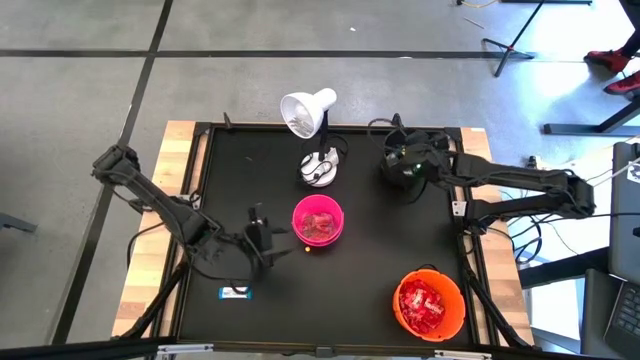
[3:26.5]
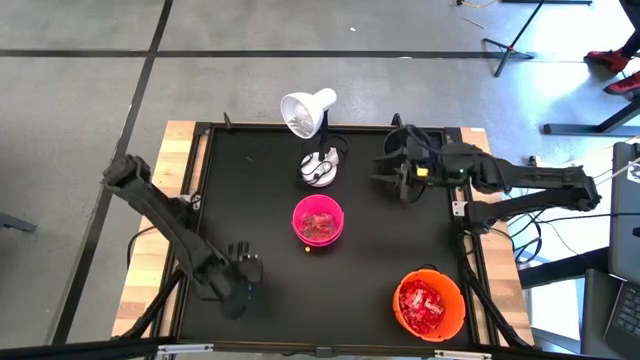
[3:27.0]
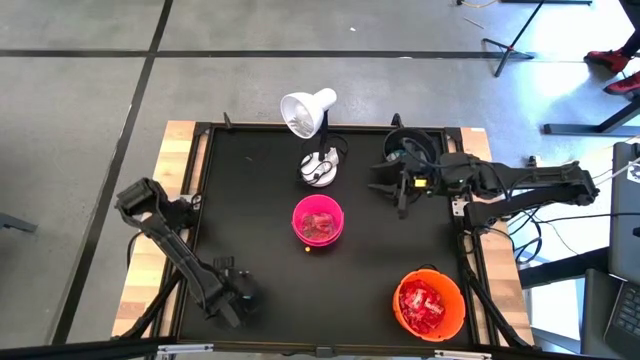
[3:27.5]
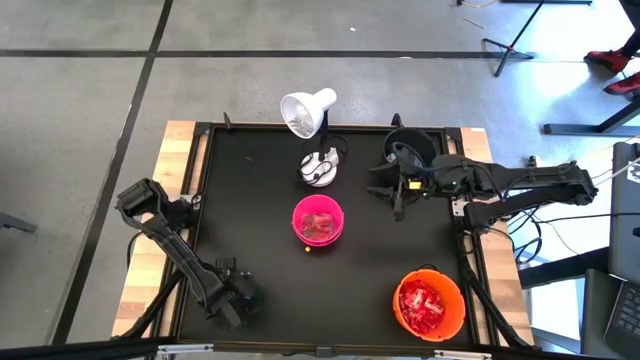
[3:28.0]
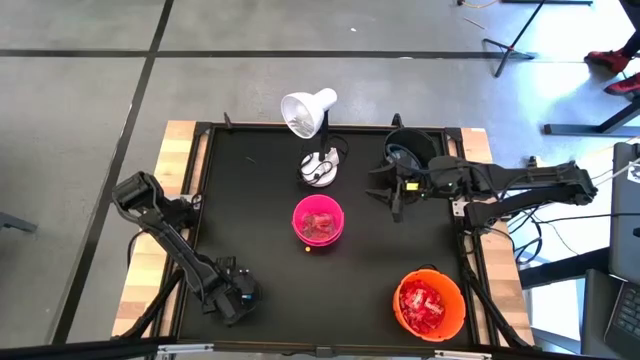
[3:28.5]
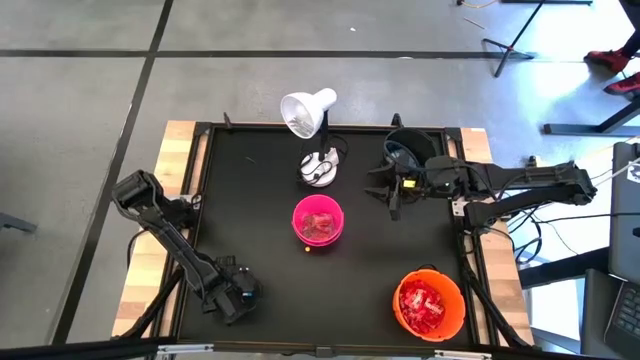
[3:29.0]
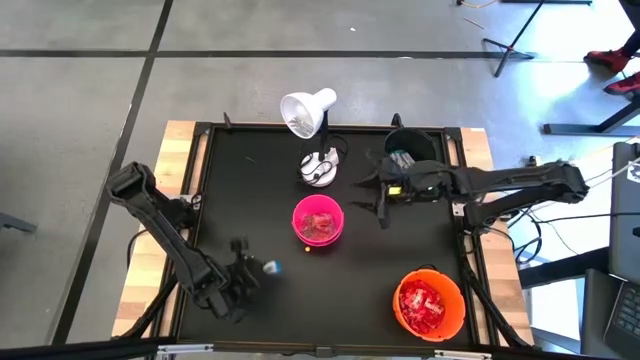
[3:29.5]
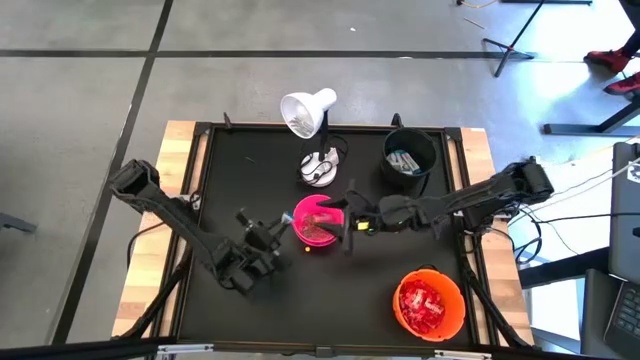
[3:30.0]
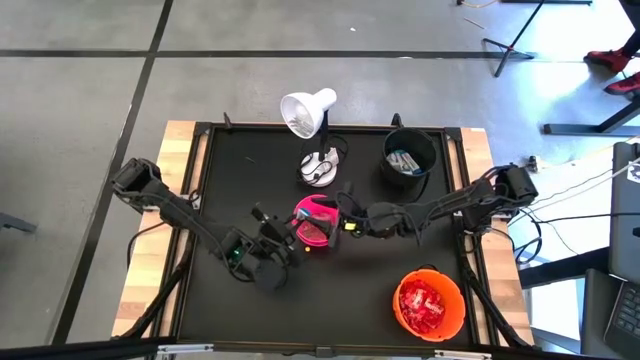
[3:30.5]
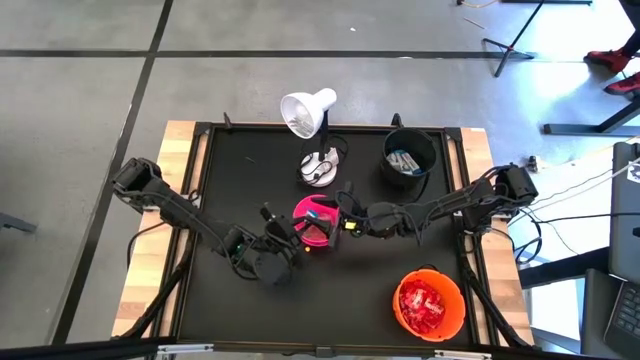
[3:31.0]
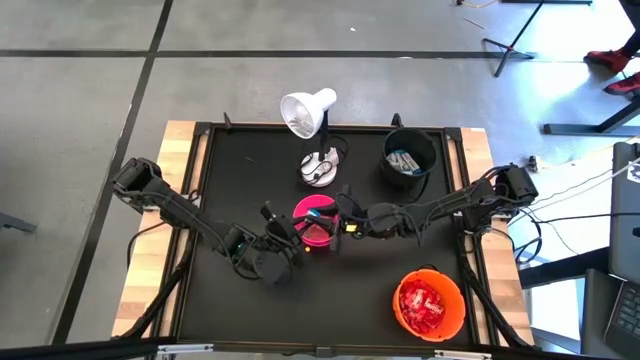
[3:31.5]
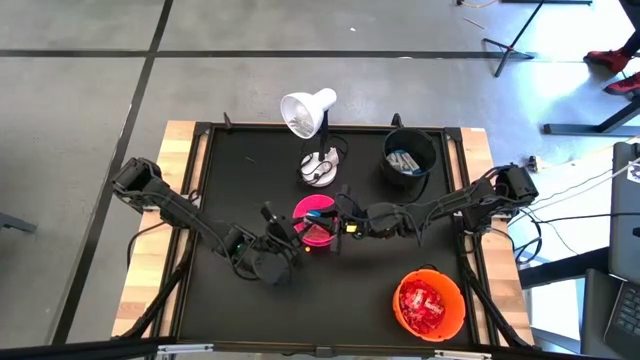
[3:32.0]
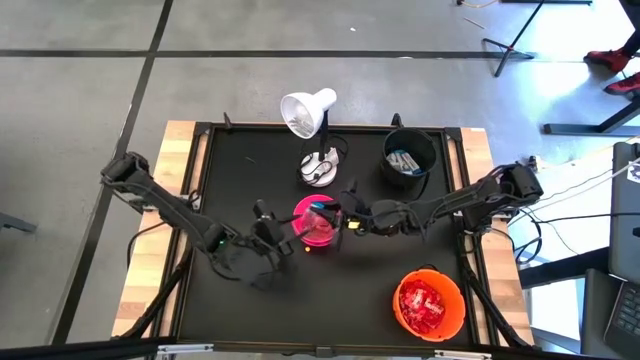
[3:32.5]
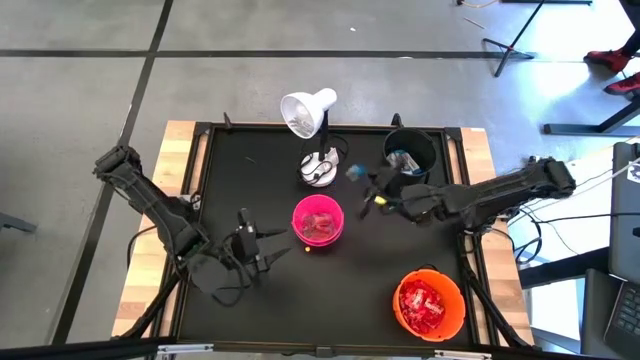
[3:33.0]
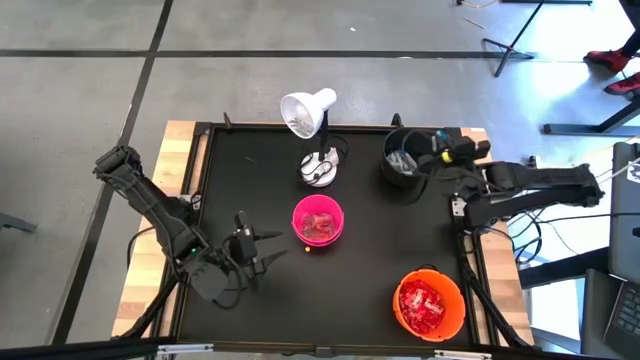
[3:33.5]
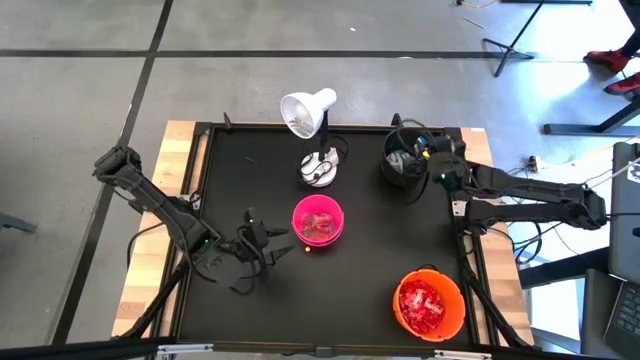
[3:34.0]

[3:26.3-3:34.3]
Task: Sort candy
Put the white chocolate bar into the black bucket

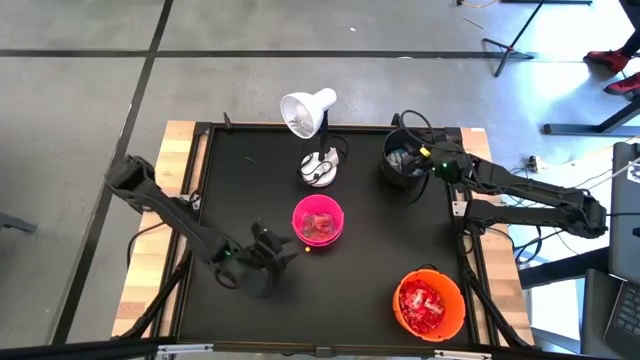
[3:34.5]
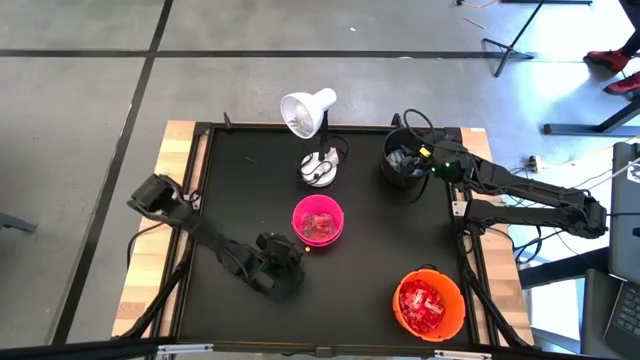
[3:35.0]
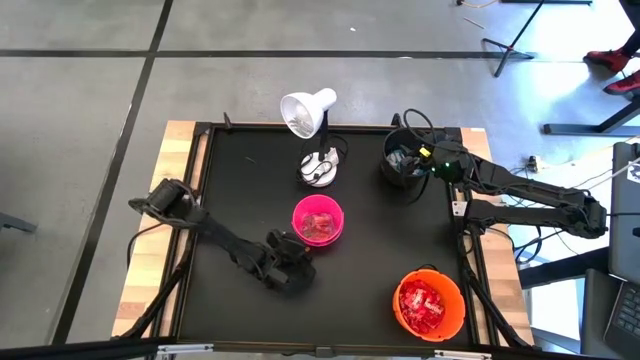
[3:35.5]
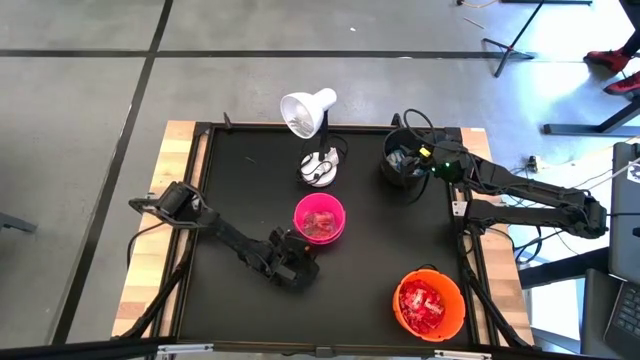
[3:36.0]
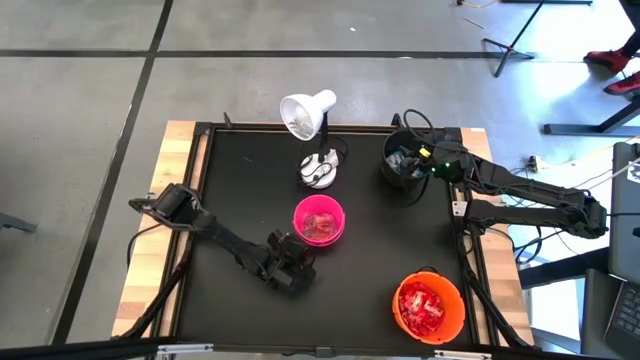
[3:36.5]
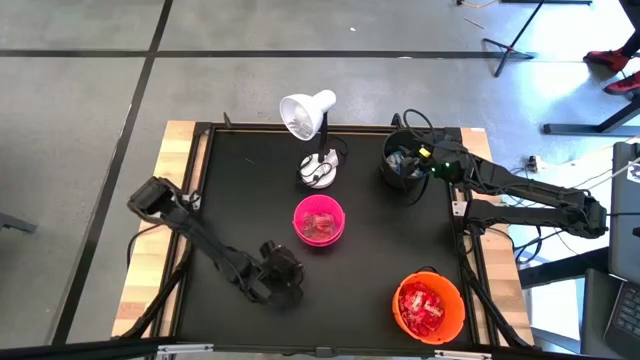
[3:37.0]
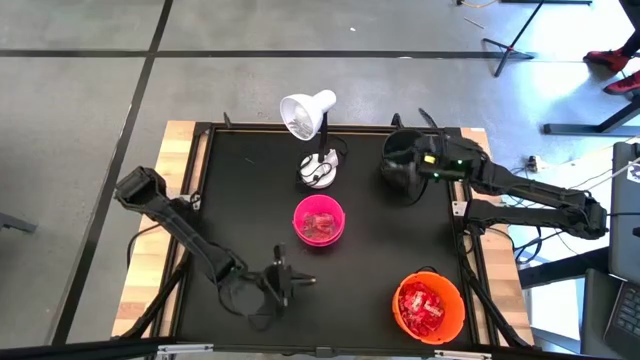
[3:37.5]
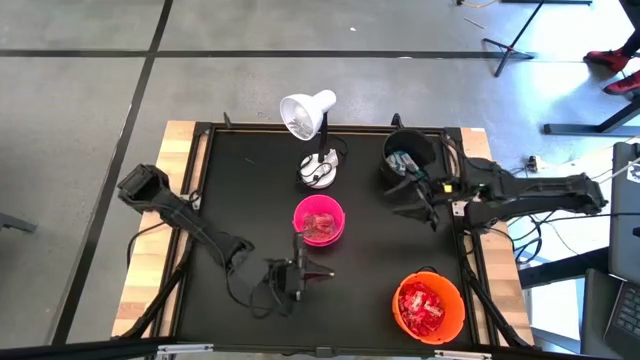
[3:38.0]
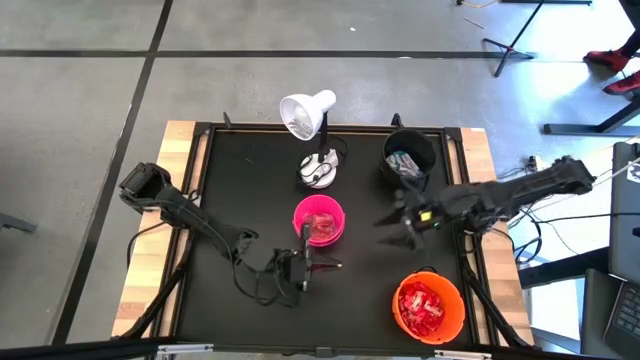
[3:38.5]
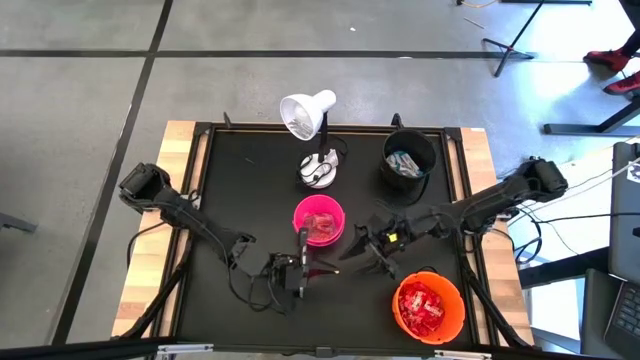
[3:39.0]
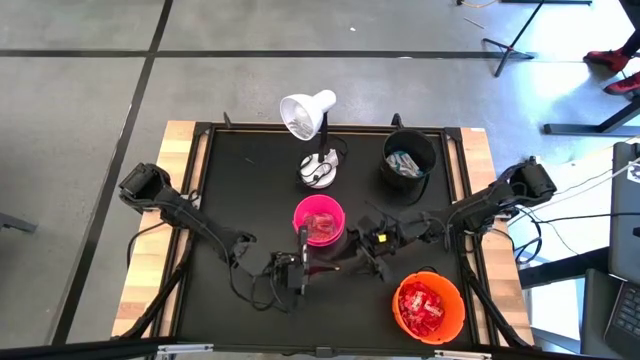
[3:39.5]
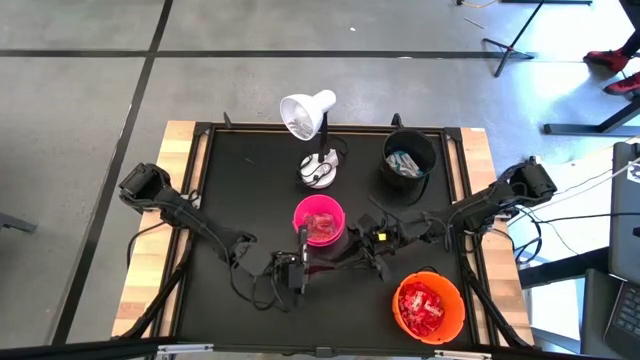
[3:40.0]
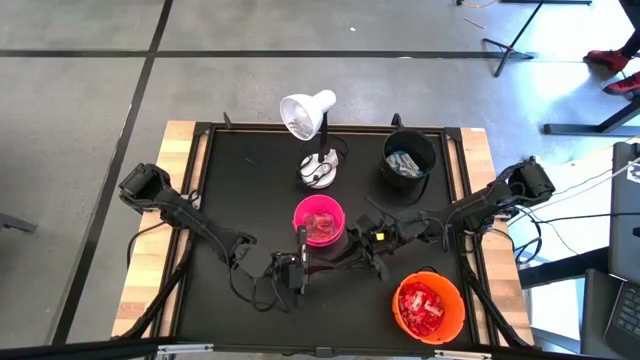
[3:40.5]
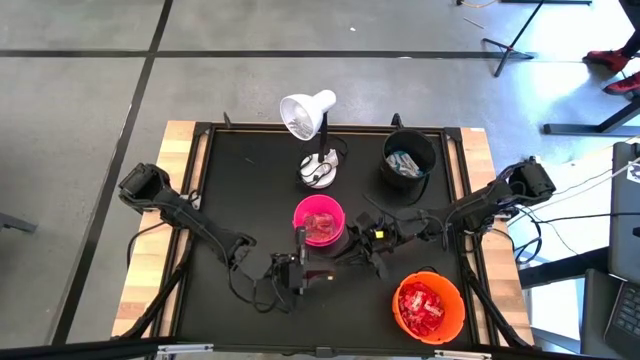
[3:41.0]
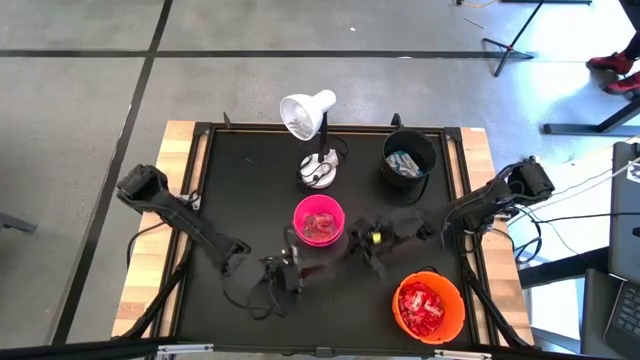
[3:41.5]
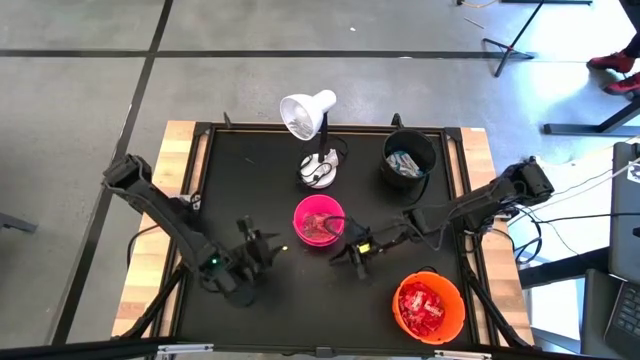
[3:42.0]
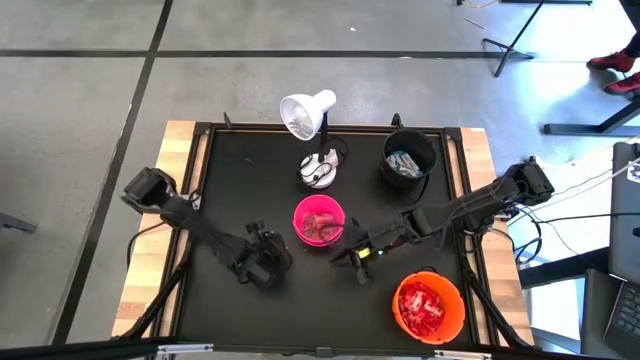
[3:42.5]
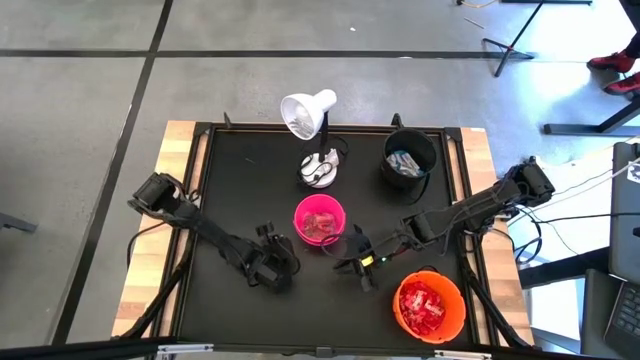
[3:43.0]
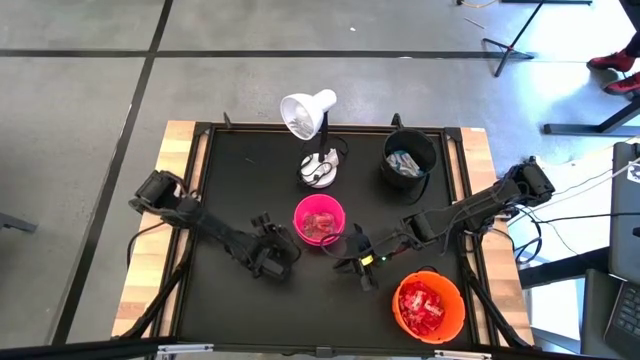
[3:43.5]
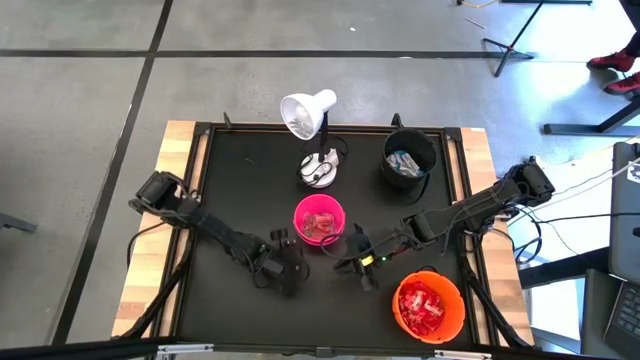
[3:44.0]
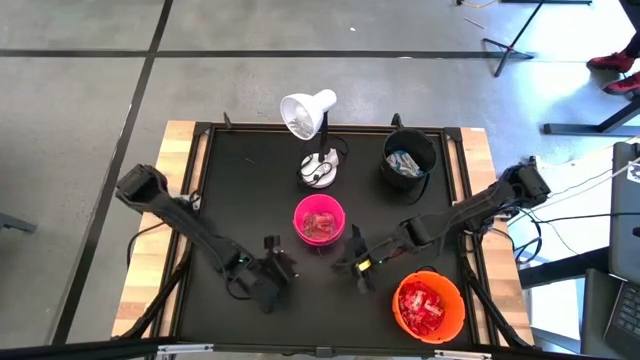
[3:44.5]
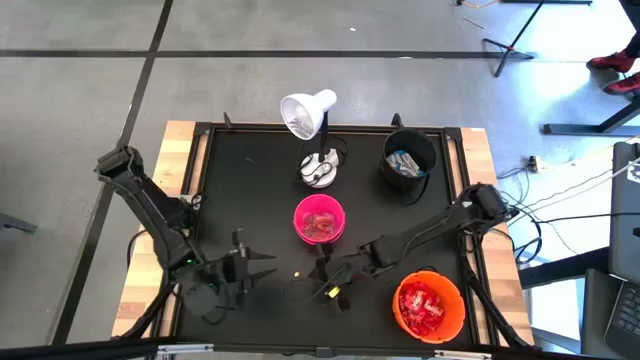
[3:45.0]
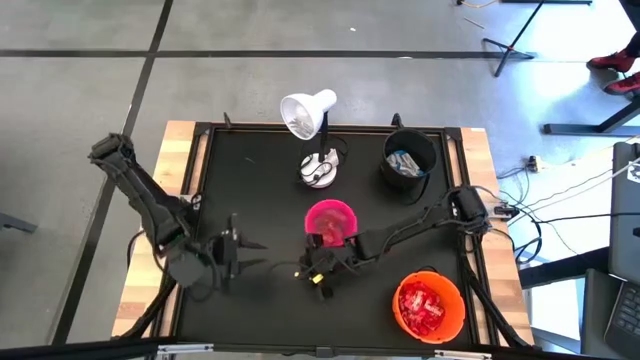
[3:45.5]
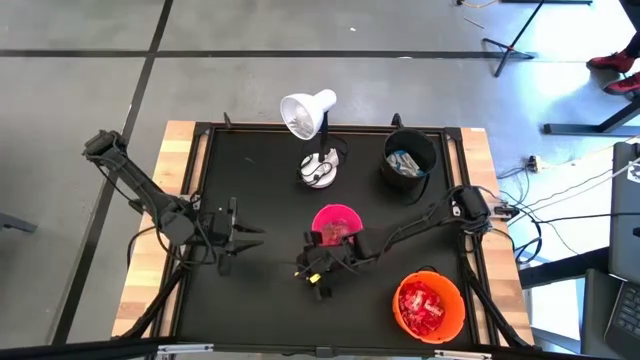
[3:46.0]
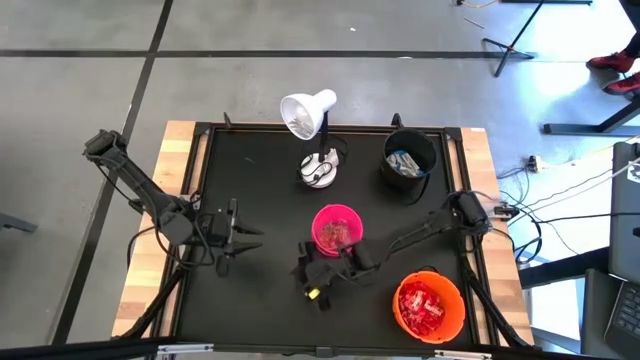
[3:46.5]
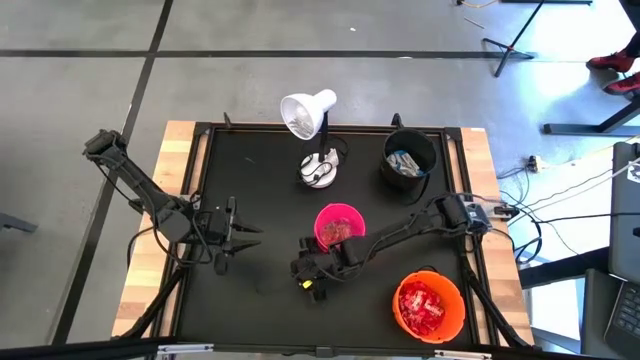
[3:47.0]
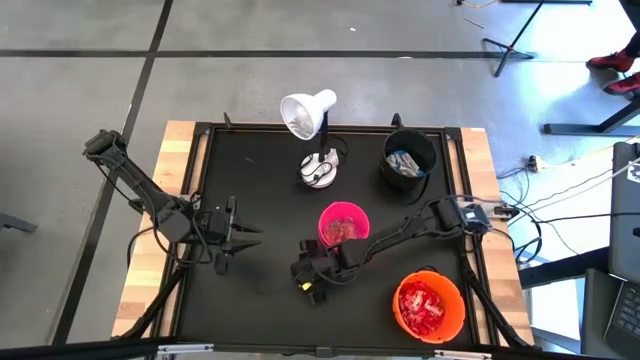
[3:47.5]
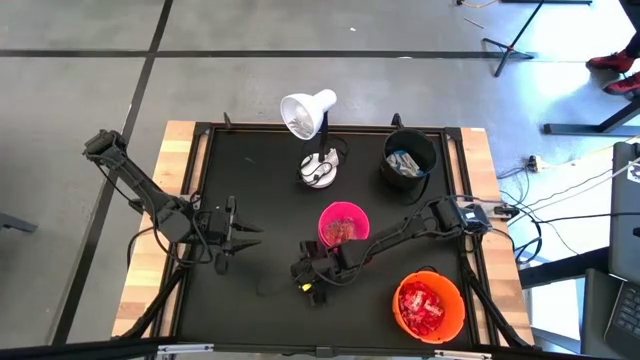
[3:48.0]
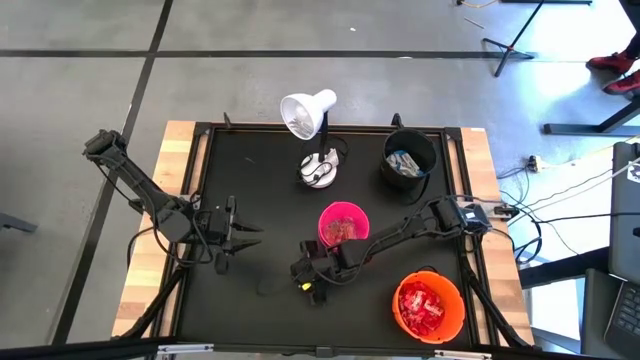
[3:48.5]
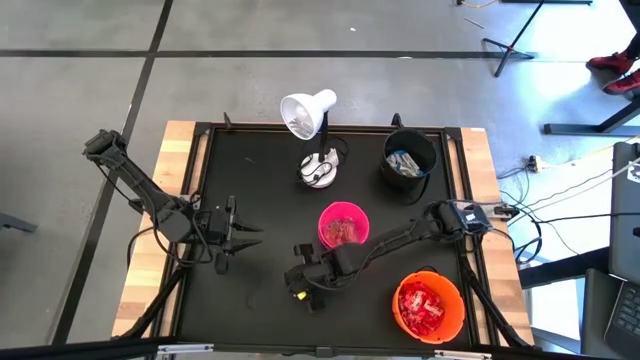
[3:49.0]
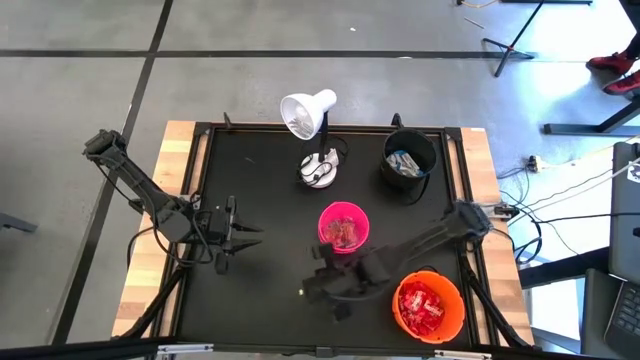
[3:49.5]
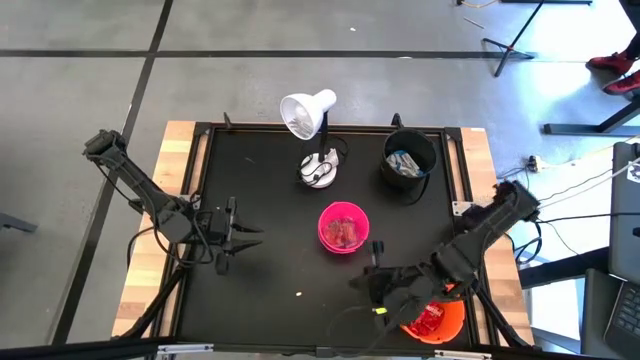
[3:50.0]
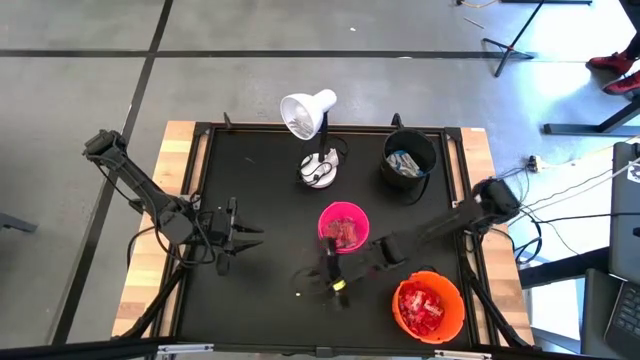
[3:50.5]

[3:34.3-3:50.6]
Put the yellow candy into the orange bucket
